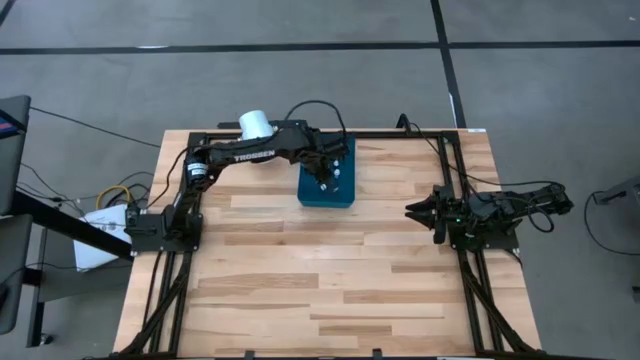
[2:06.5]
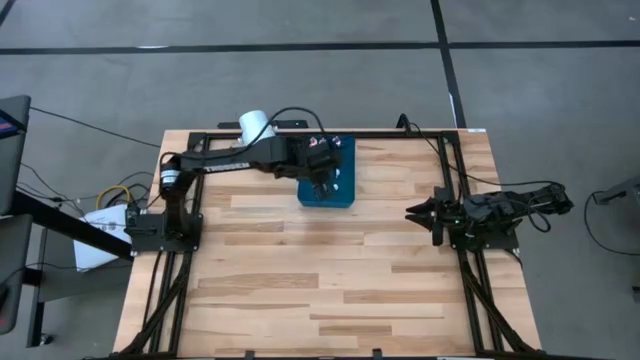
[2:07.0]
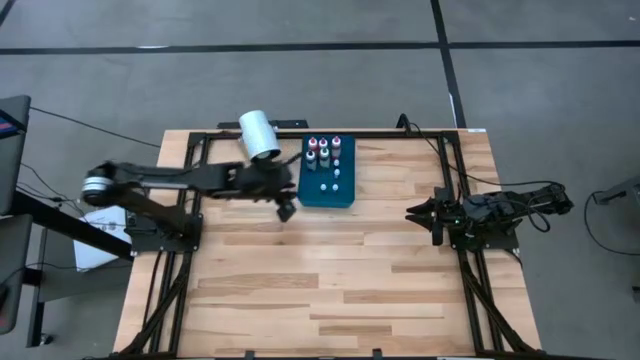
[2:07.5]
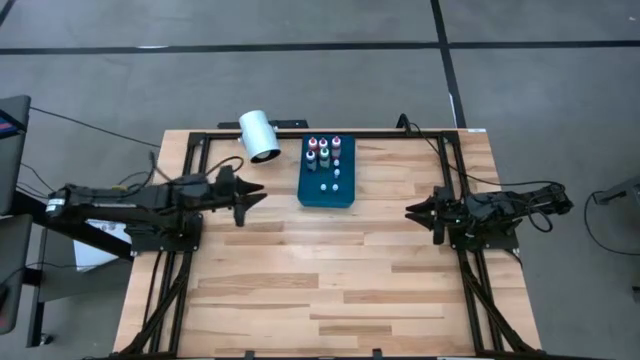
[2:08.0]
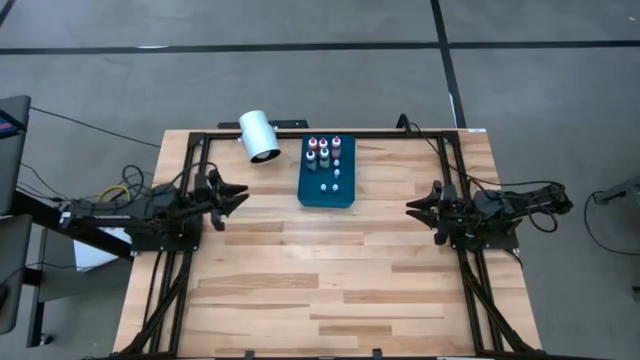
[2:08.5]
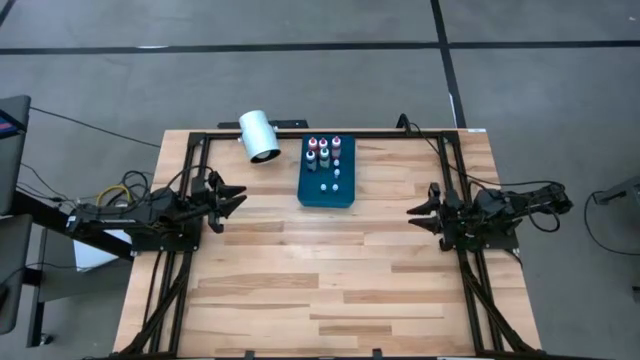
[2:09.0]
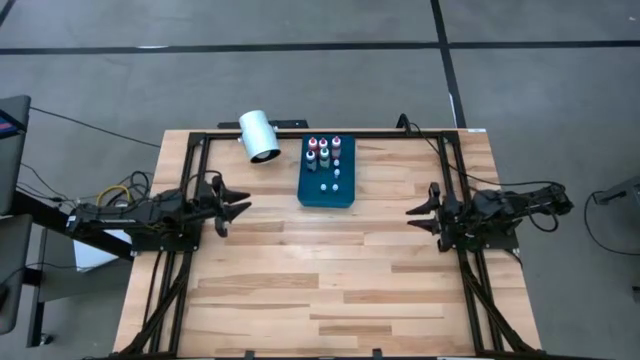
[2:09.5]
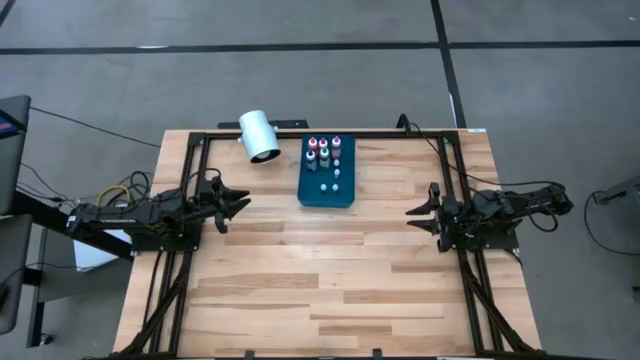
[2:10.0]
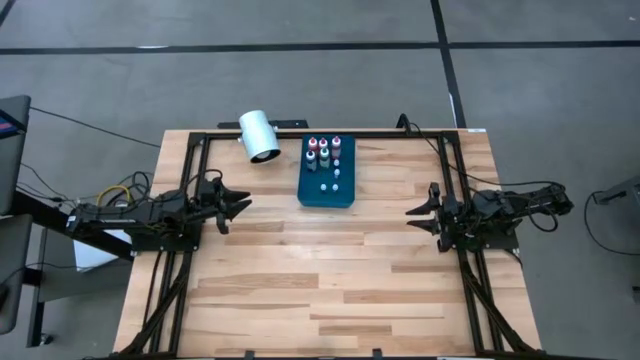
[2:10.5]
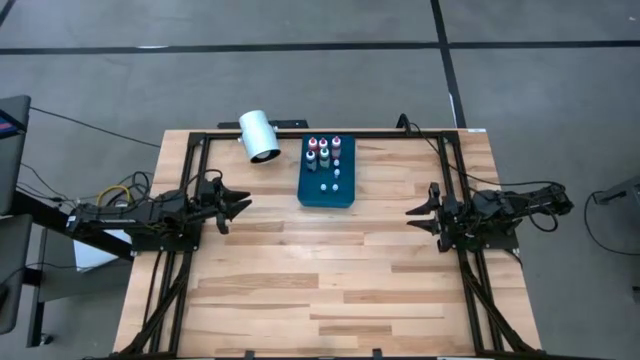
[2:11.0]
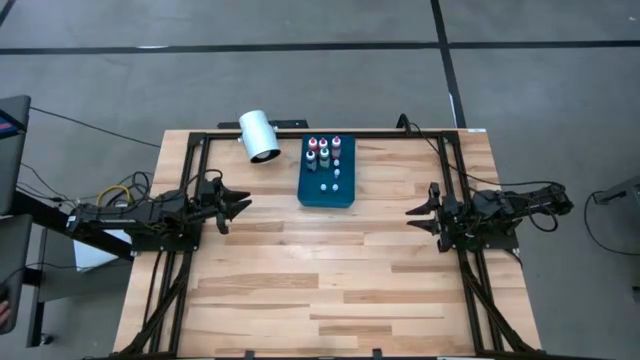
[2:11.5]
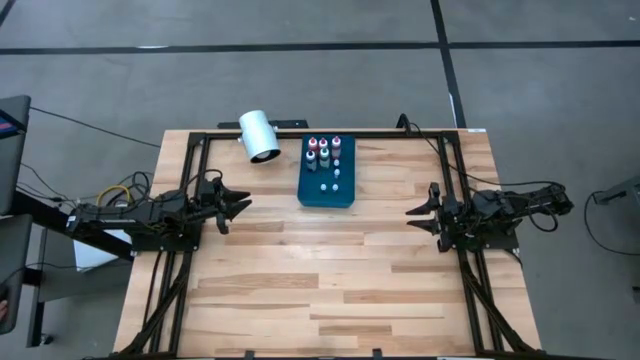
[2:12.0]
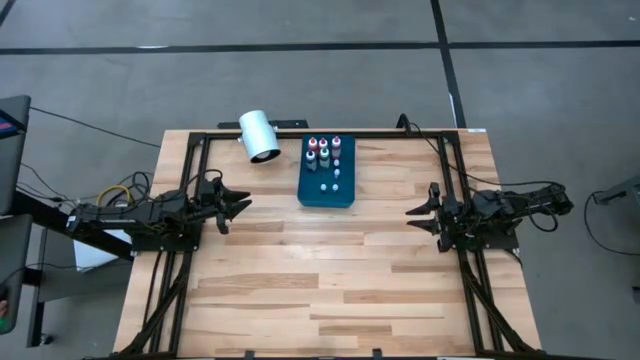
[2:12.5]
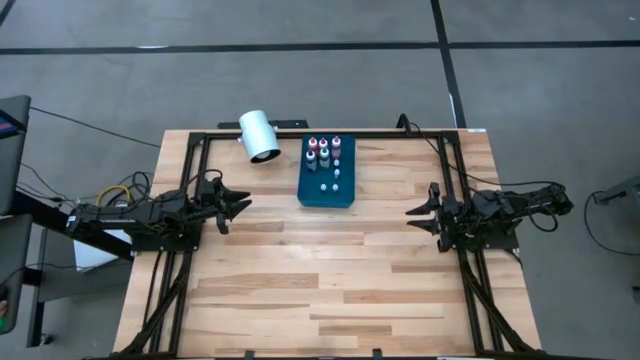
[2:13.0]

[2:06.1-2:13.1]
Task: Pick & Place food coloring
Return to Home Position

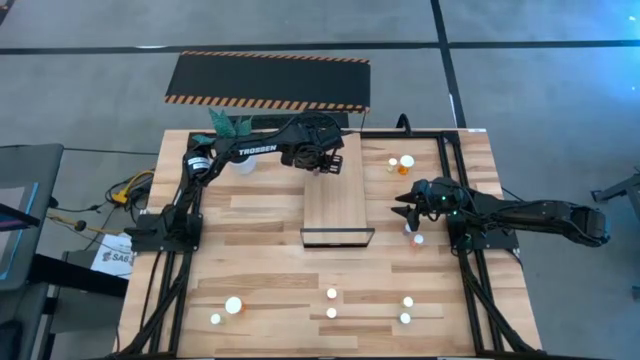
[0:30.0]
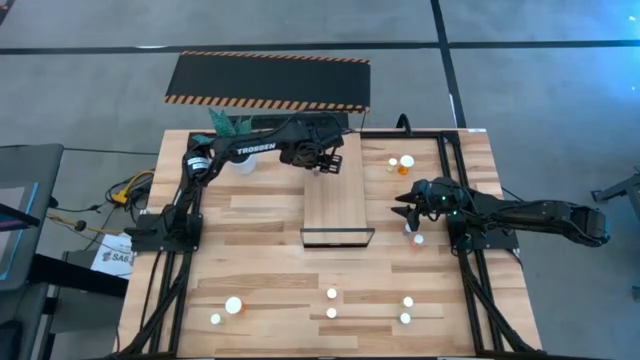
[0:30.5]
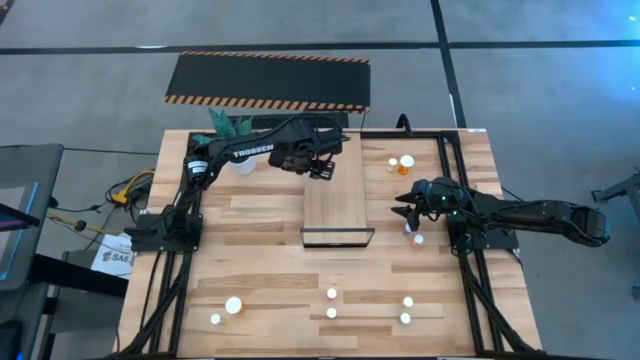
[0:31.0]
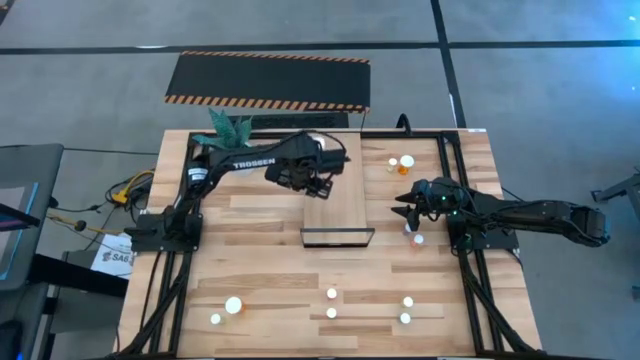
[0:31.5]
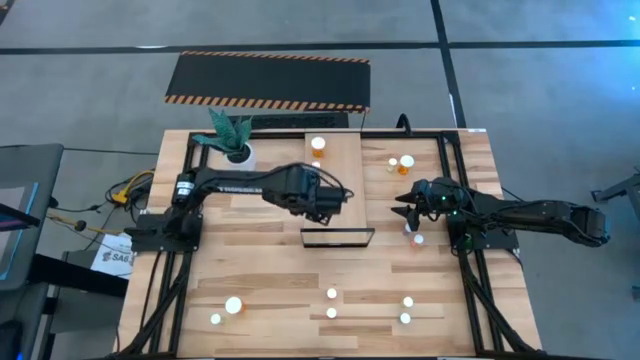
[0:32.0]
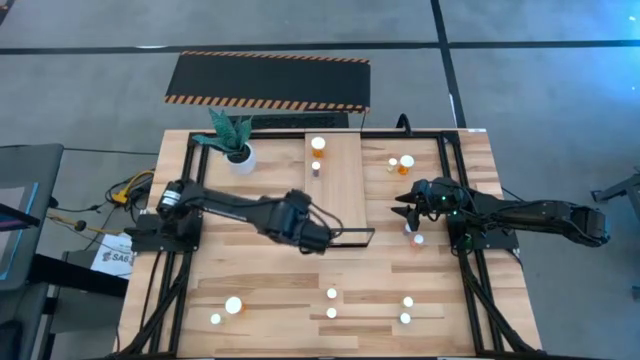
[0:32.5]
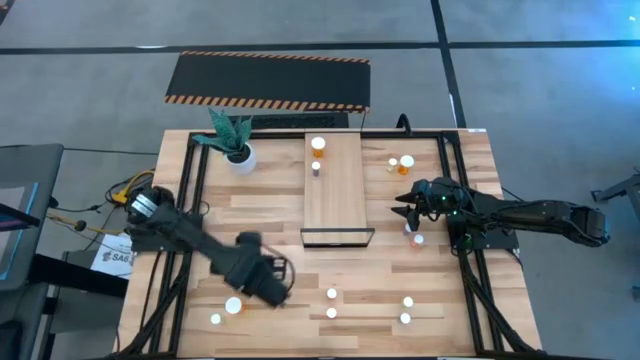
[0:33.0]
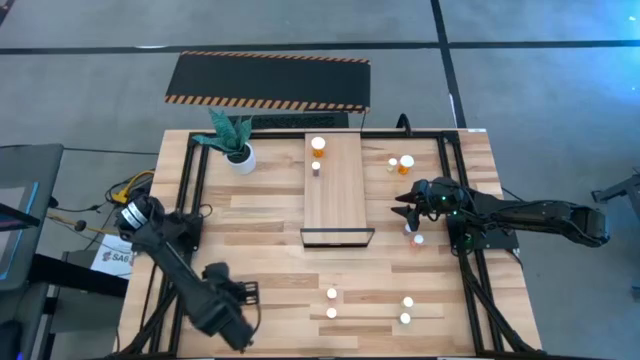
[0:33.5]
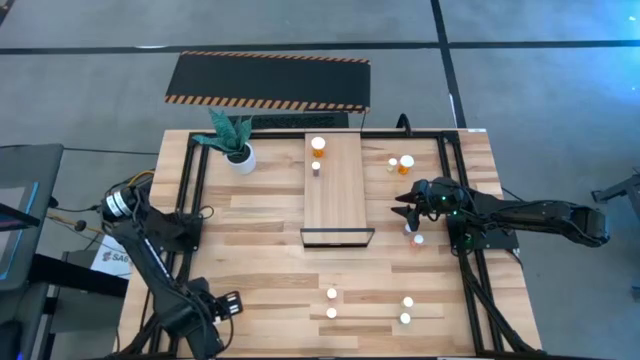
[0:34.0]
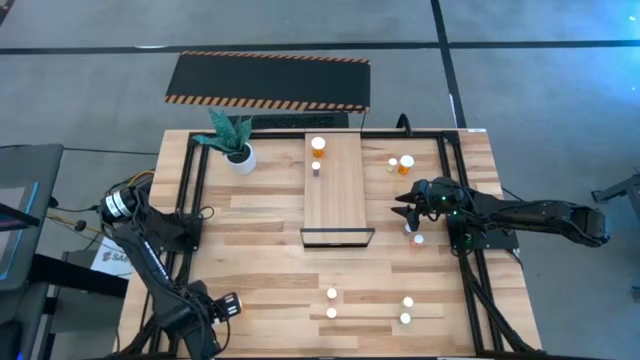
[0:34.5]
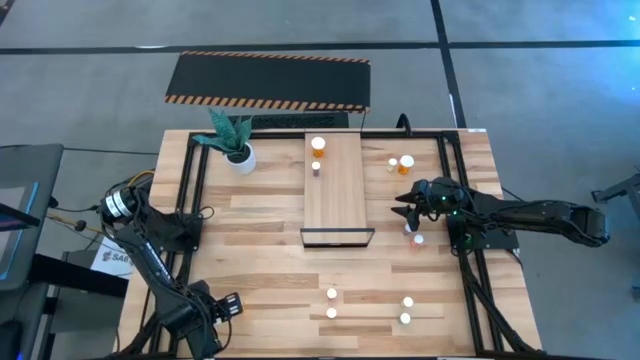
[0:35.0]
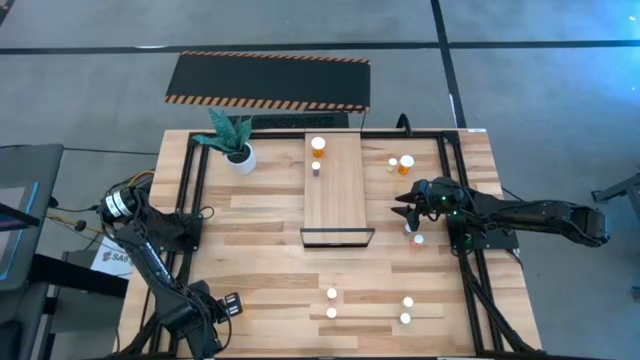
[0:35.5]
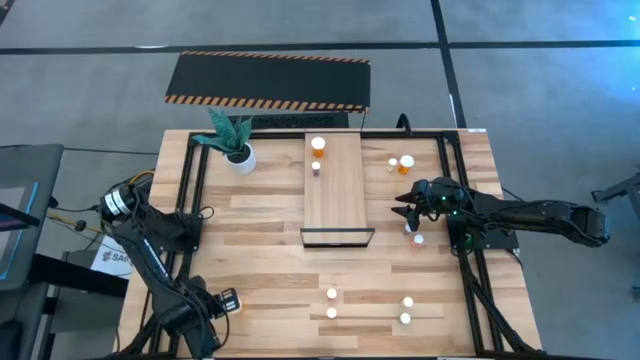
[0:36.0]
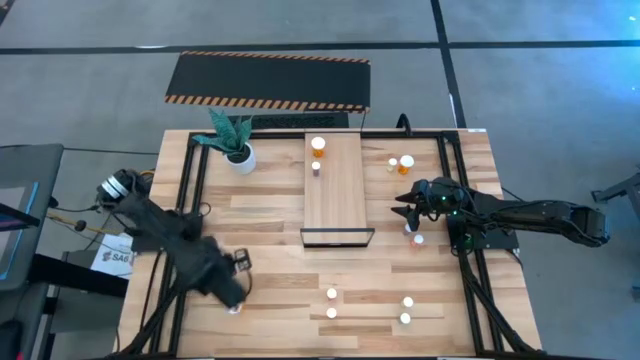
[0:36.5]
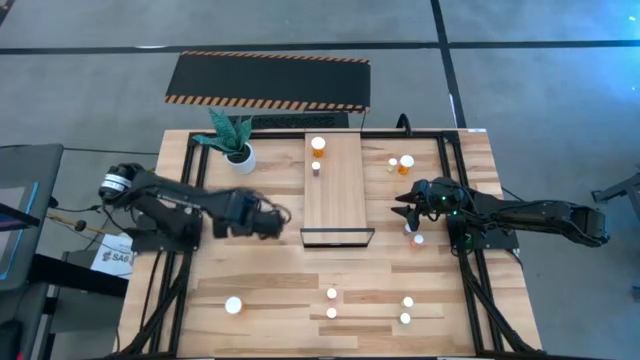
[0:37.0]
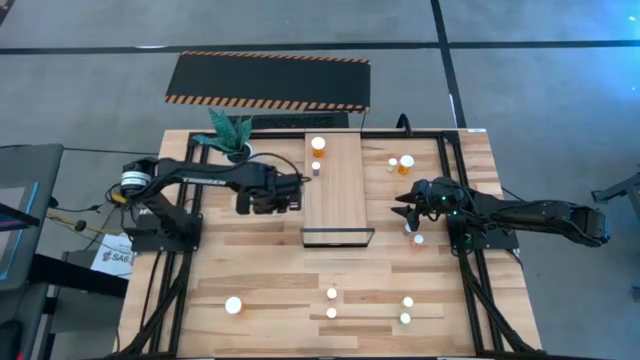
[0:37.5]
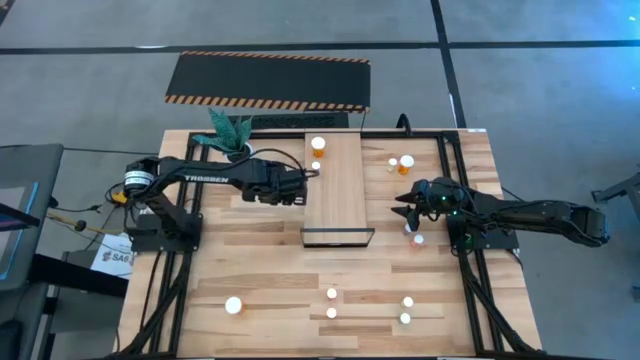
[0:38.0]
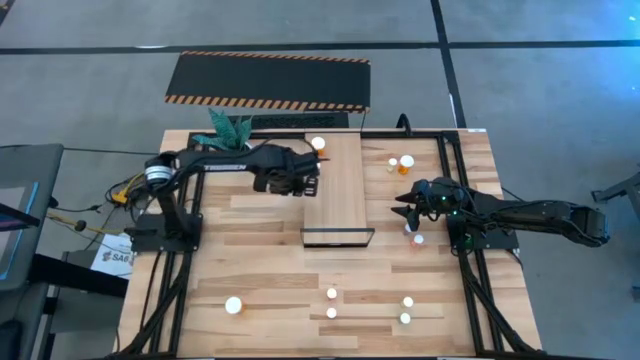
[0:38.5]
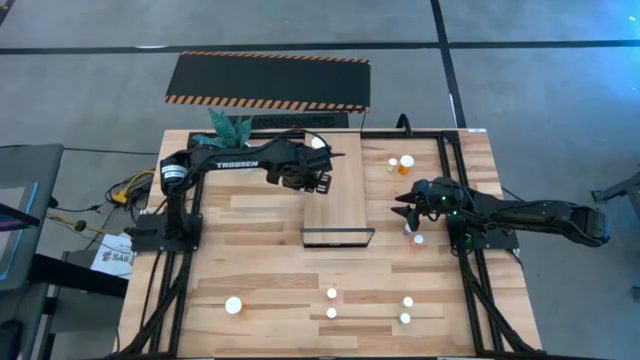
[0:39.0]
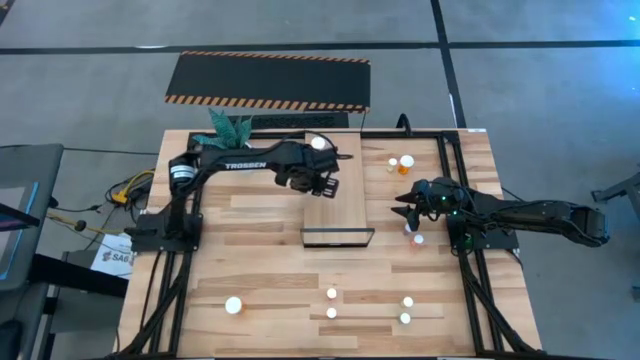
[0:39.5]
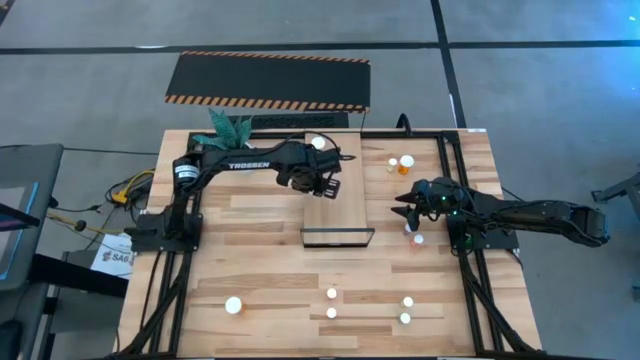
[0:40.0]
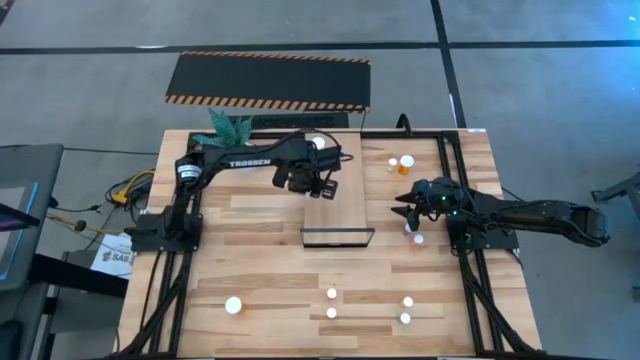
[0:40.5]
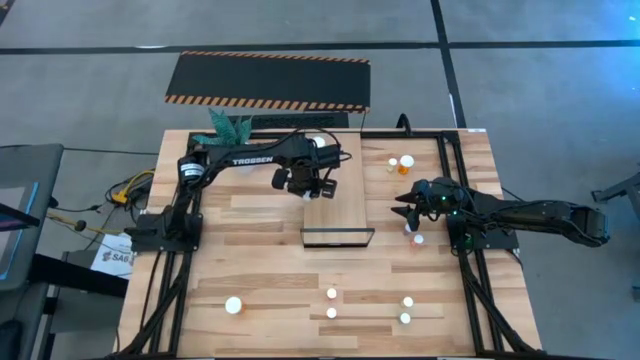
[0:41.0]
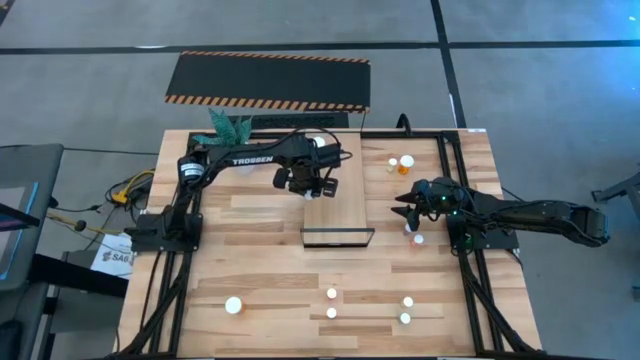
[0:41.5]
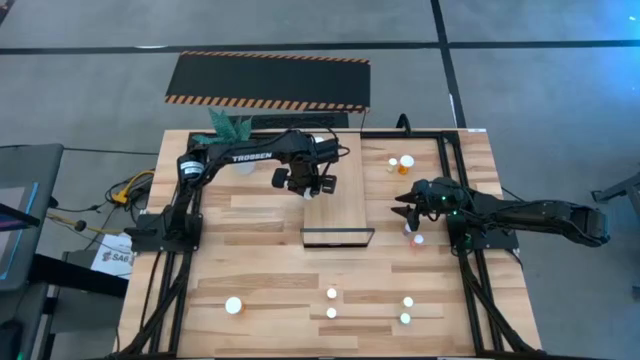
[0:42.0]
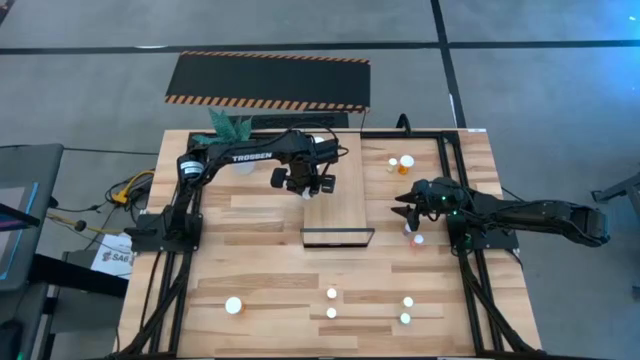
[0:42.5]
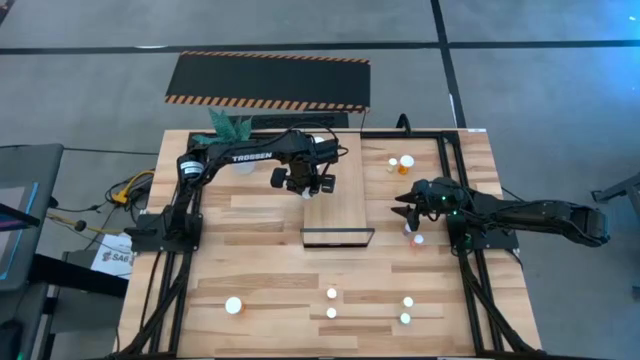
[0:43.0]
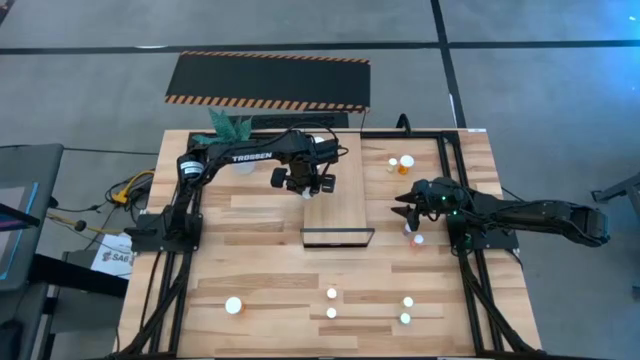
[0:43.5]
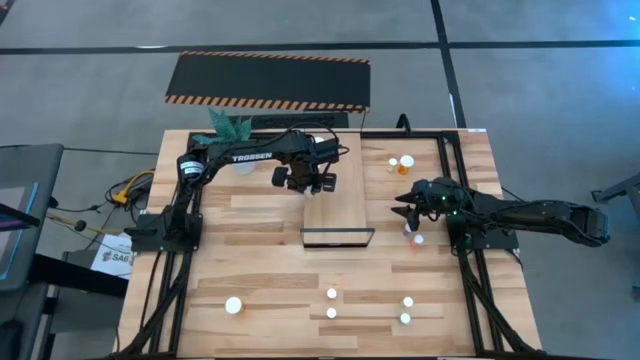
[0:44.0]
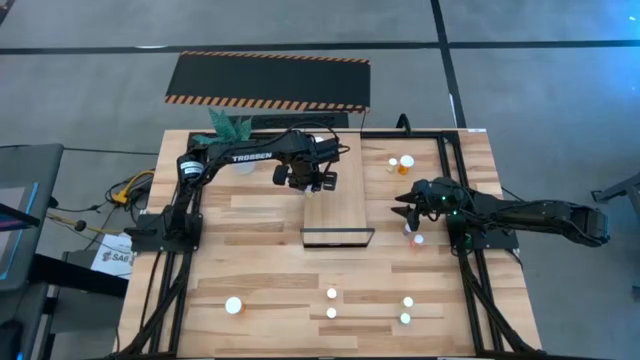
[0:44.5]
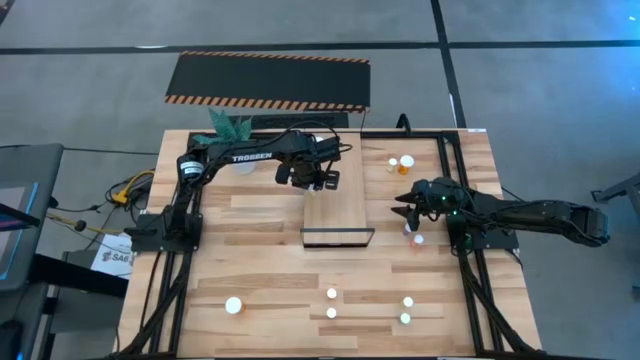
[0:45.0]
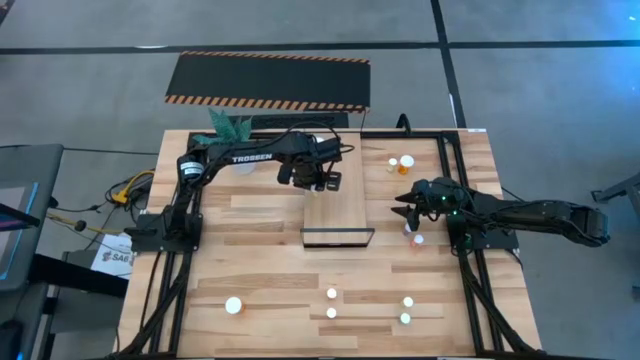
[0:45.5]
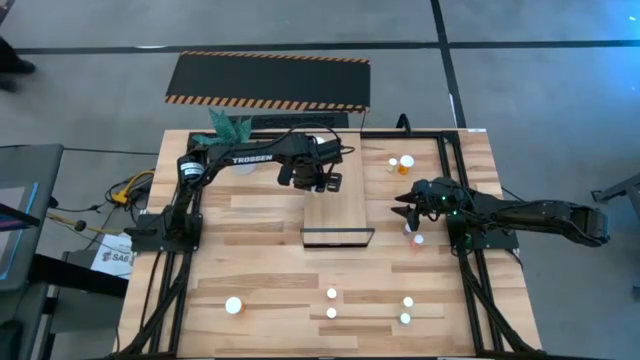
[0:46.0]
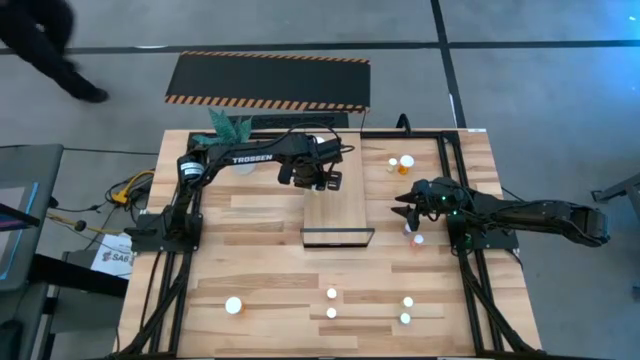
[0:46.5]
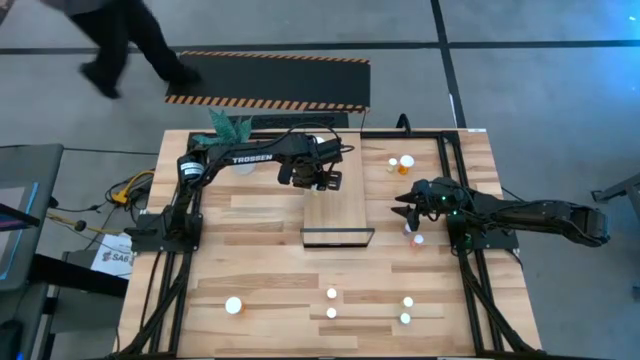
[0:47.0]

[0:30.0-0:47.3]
Task: Pick and place medicine bottles onto shelf by color
Put the bottom left yellow pill bottle on the shelf
